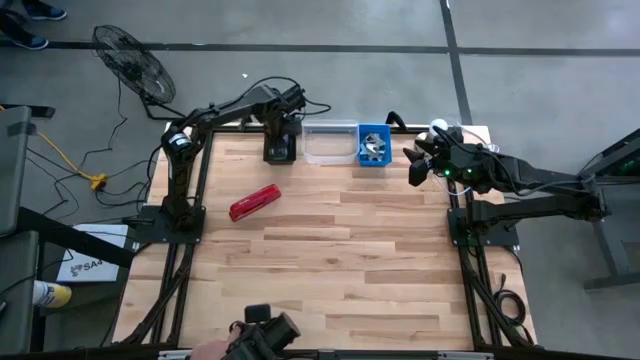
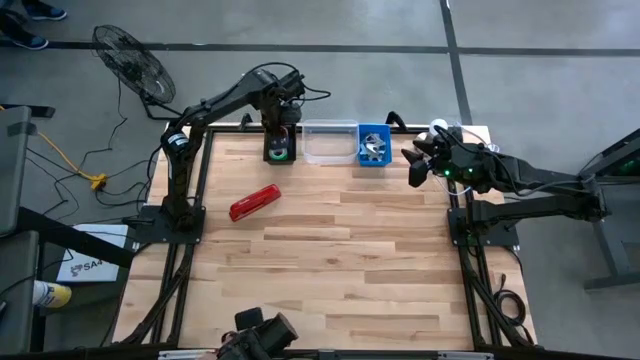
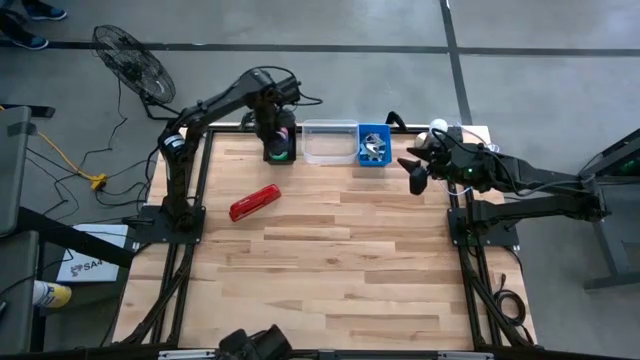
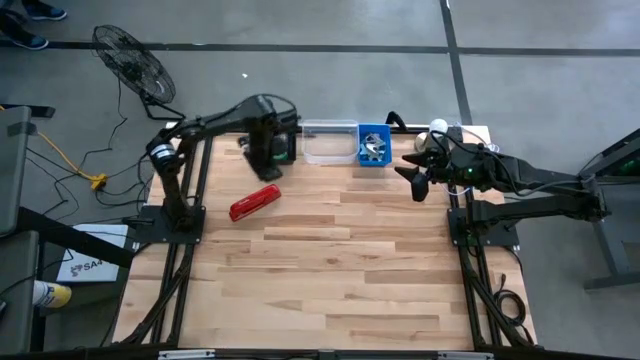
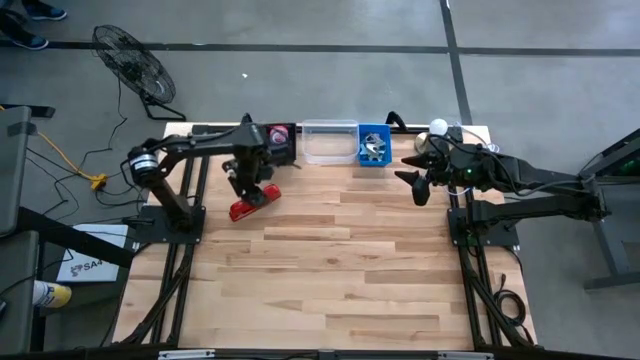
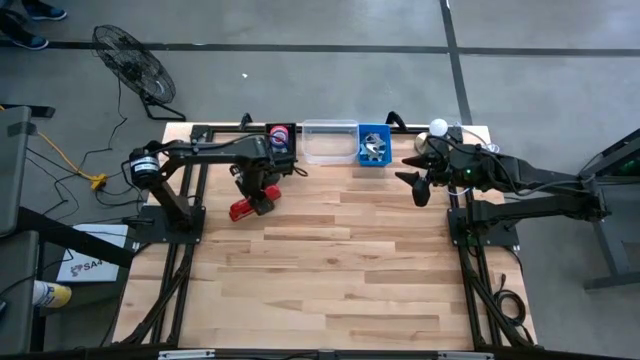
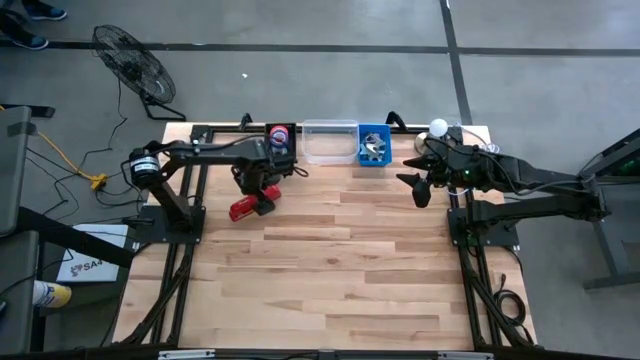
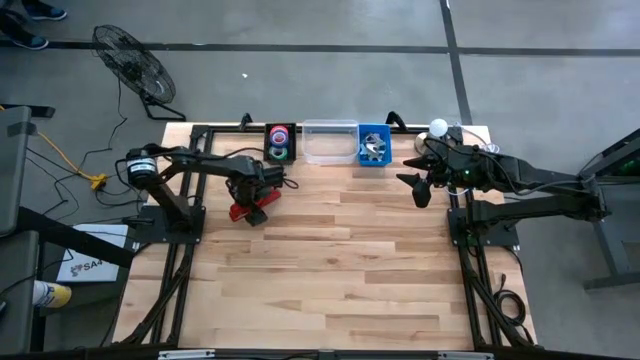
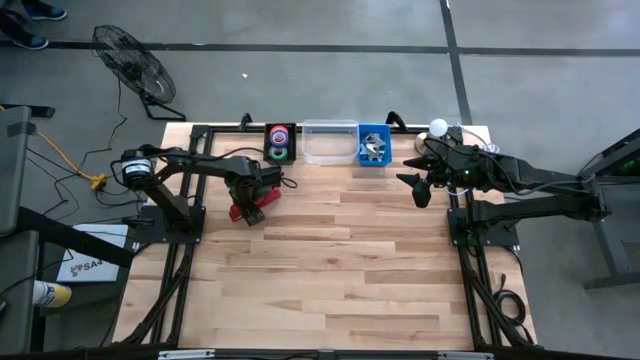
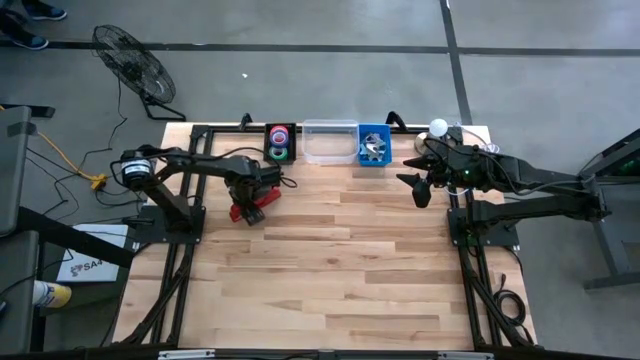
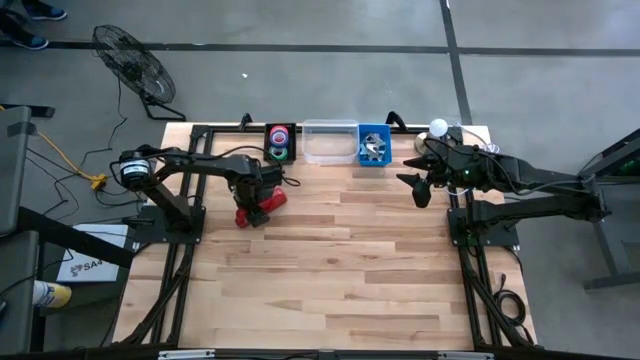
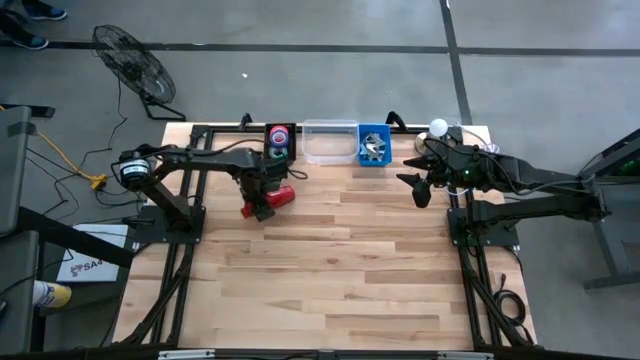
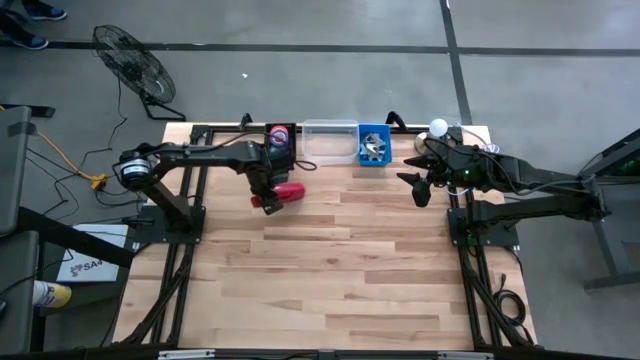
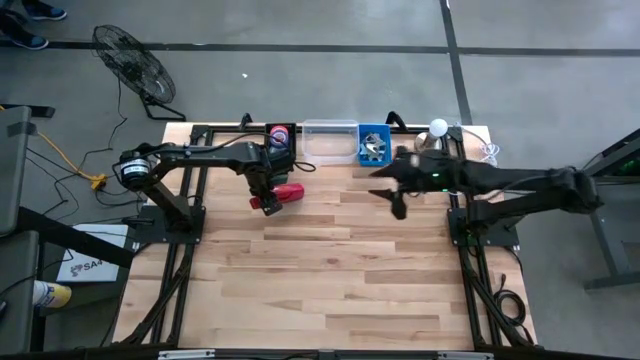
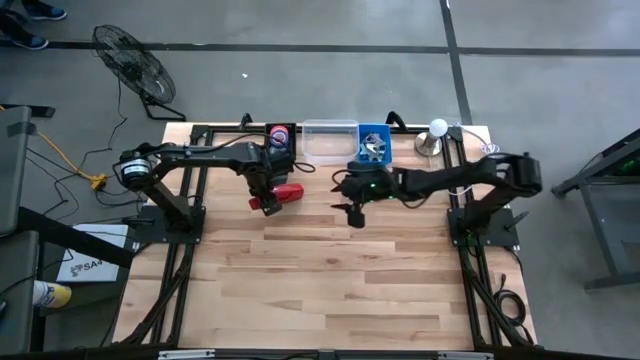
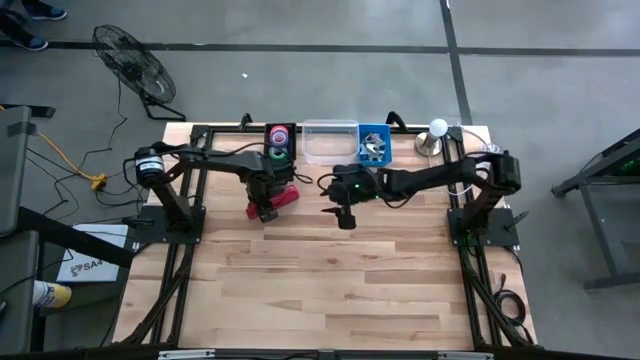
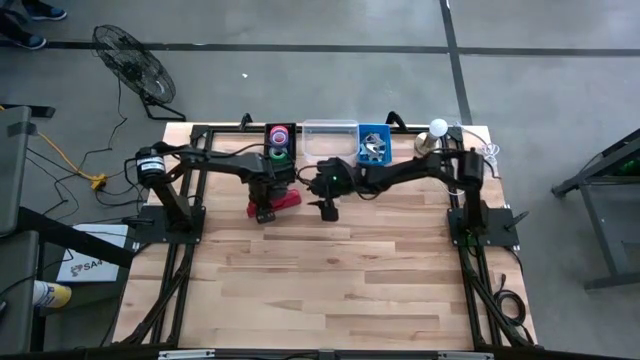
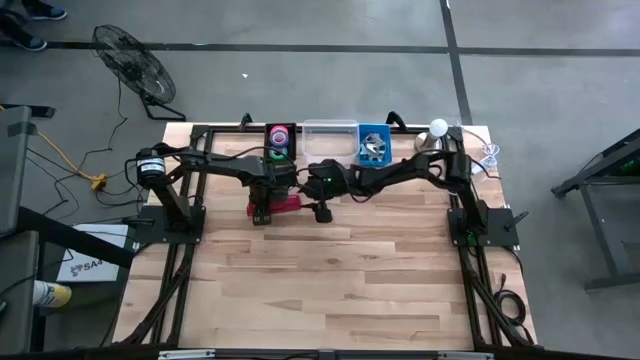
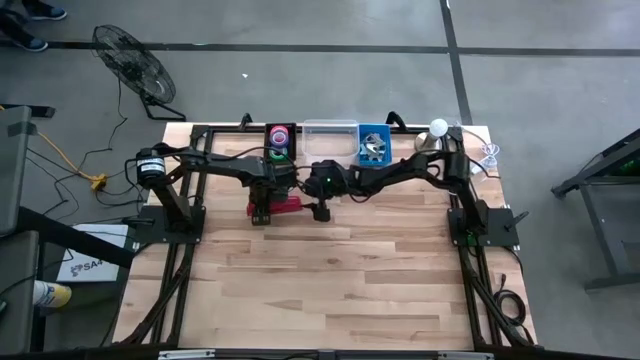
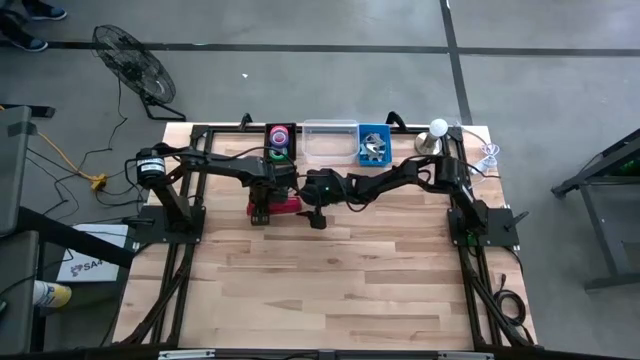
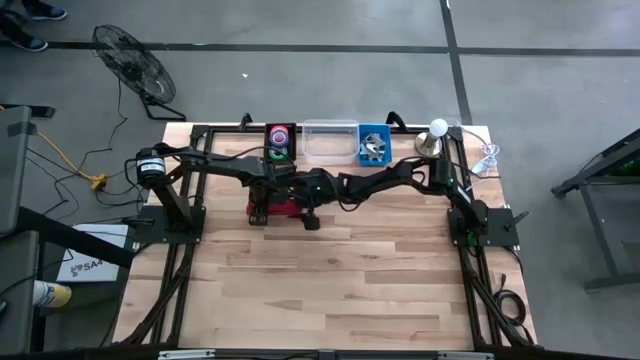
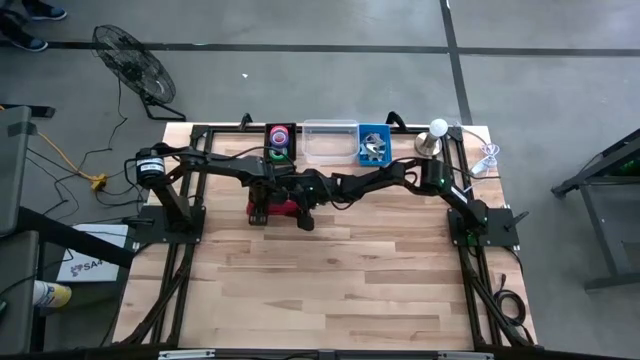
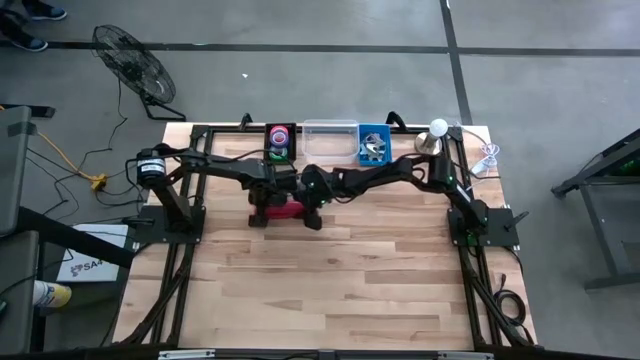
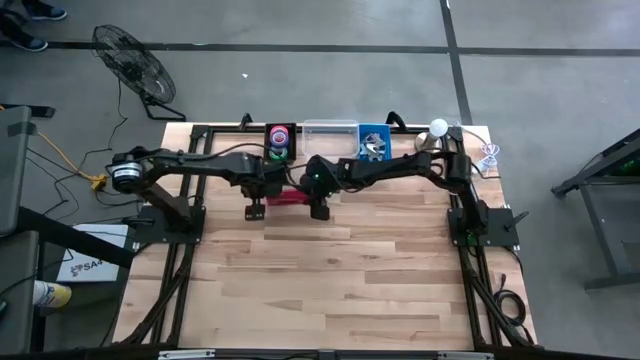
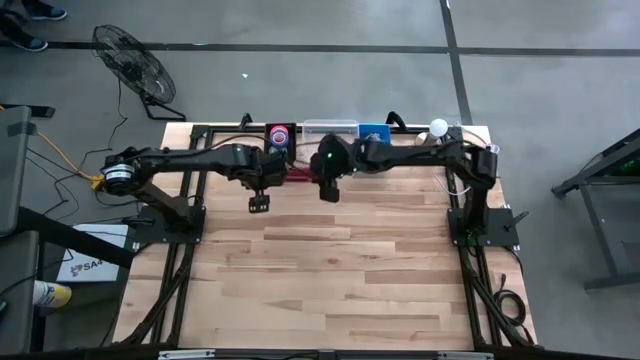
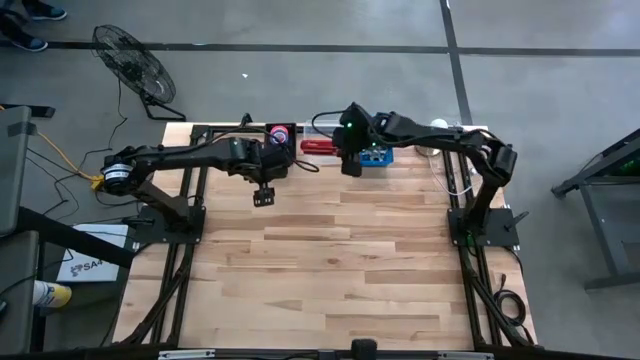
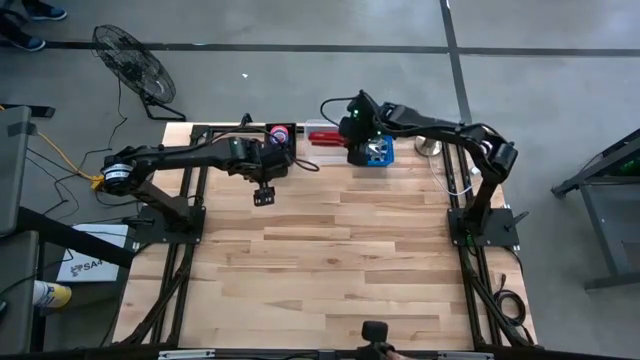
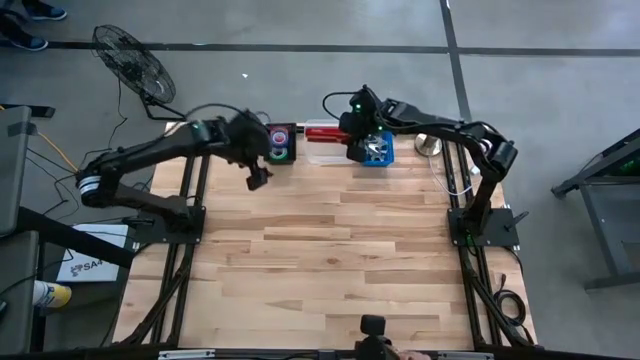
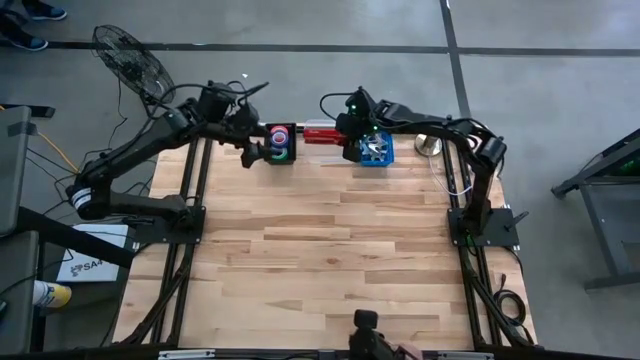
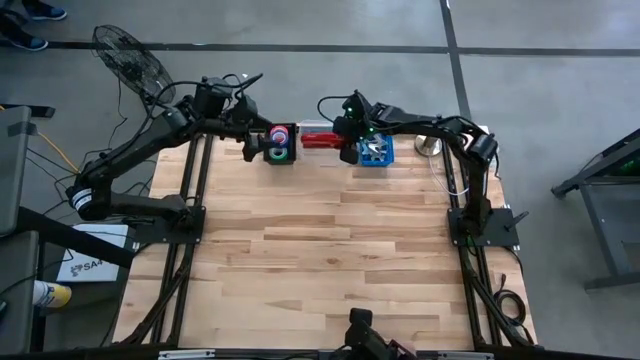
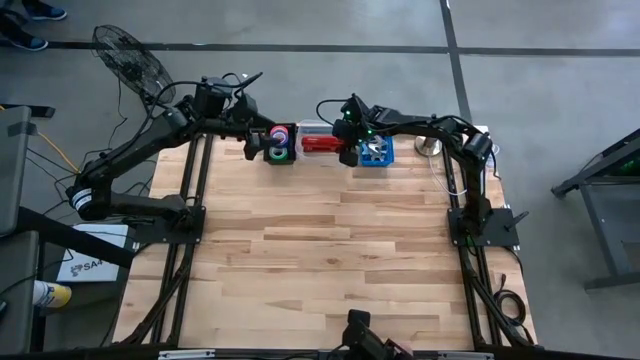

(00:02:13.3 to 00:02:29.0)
Task: Pick and place Stapler, Stapler remover, tape
Put the red stapler into the transparent bin

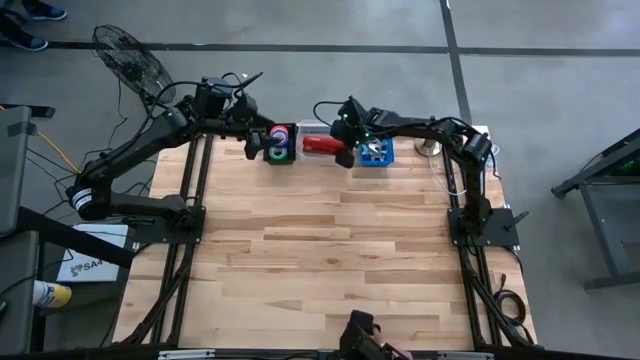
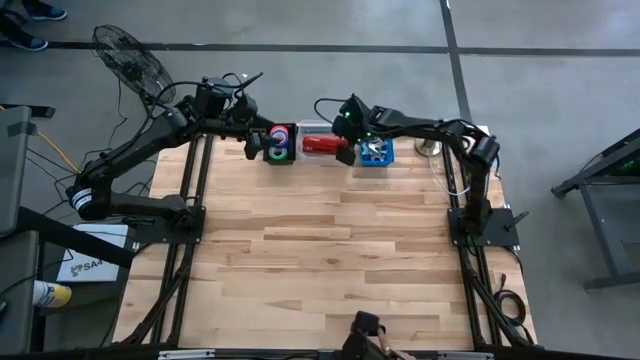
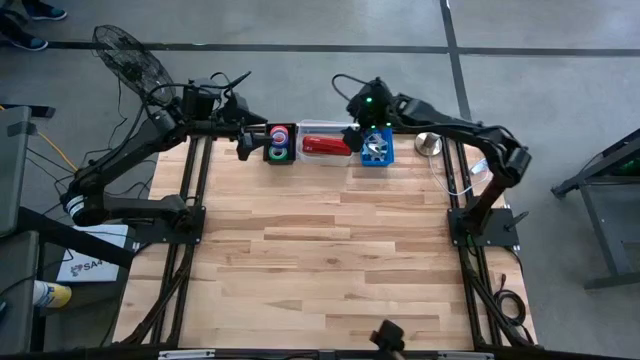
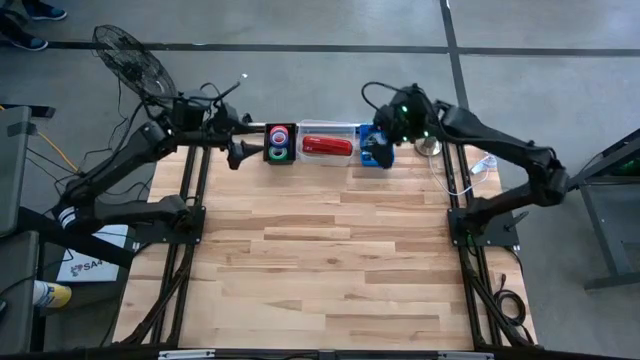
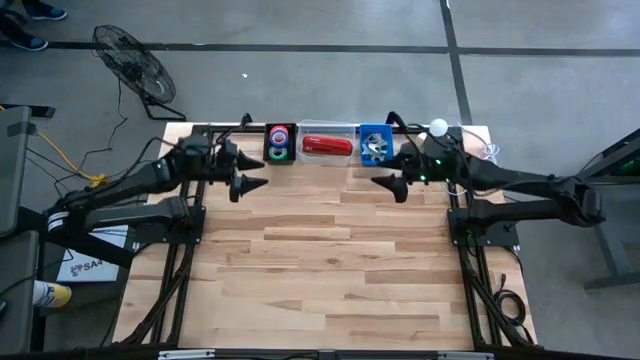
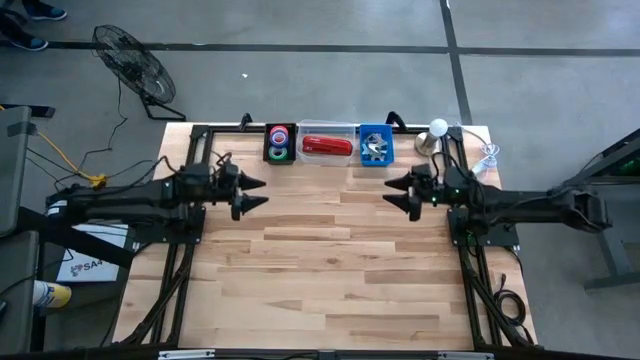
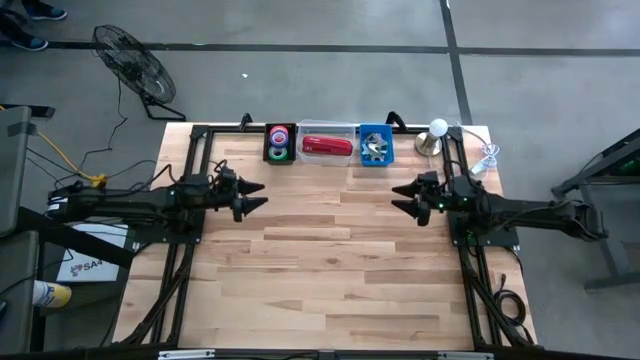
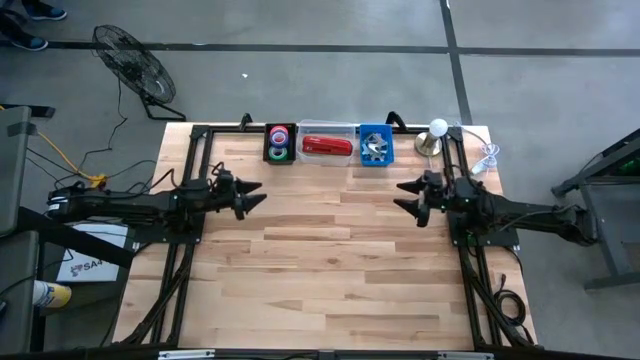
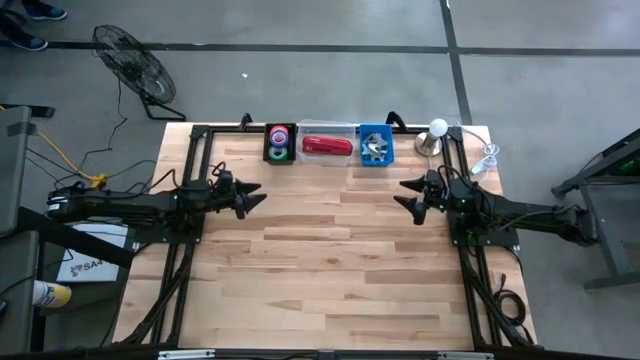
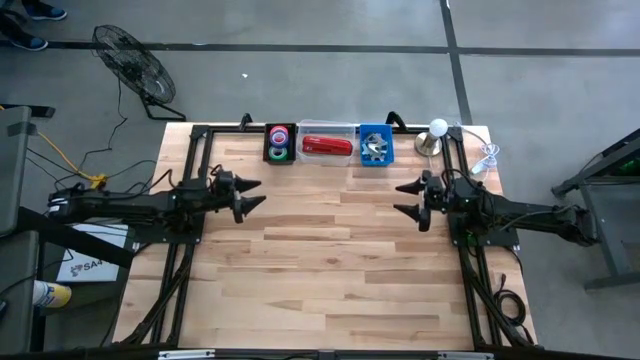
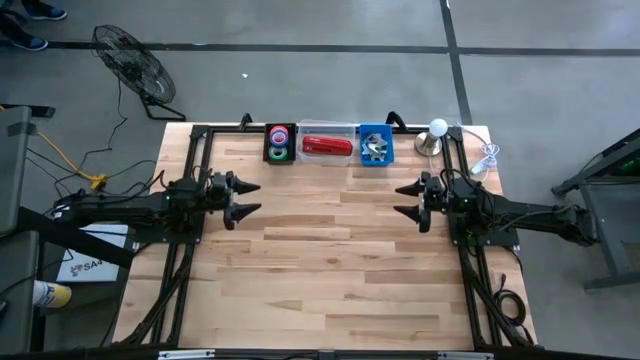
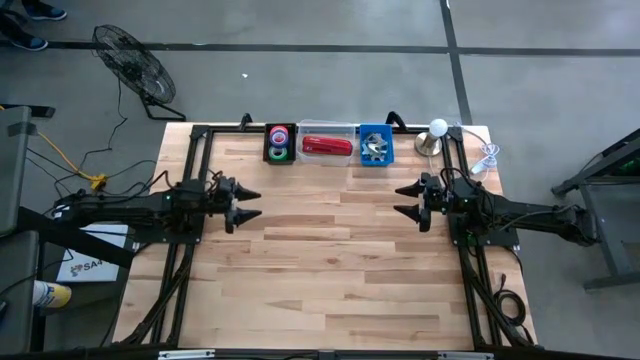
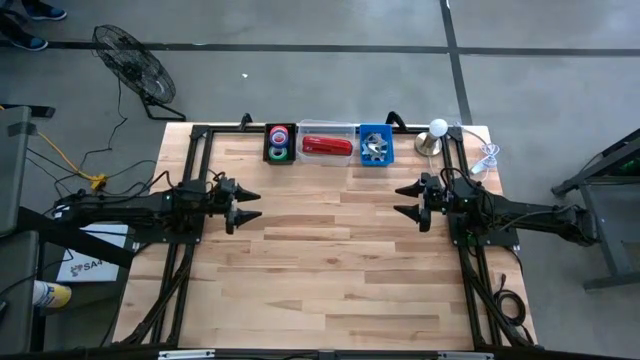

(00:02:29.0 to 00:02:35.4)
Return to Home Position
